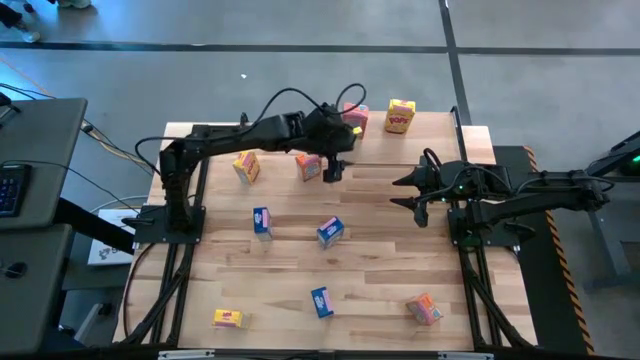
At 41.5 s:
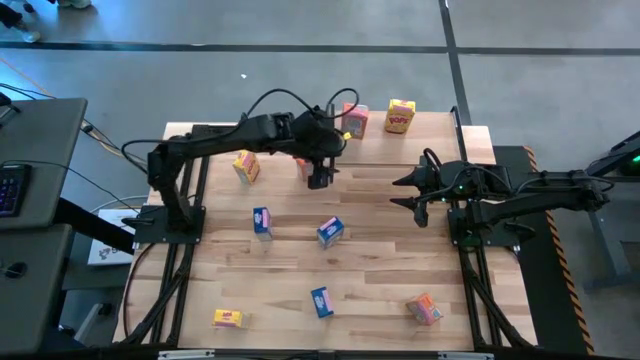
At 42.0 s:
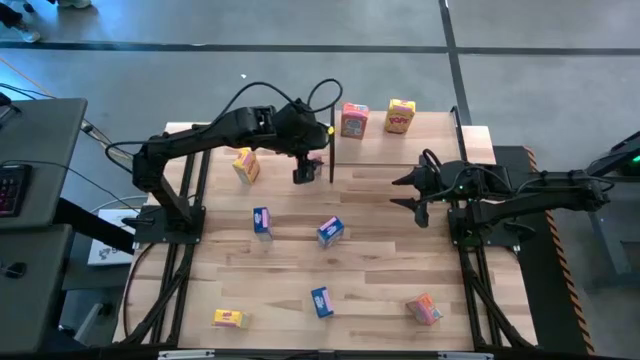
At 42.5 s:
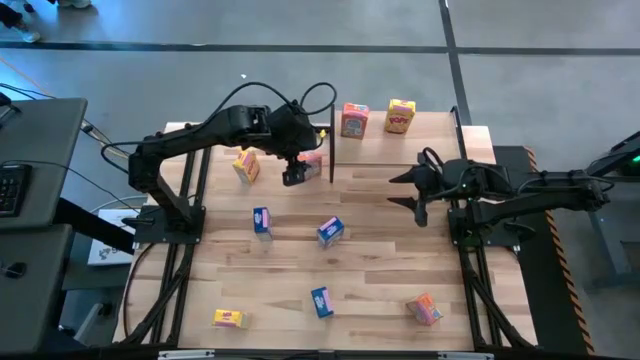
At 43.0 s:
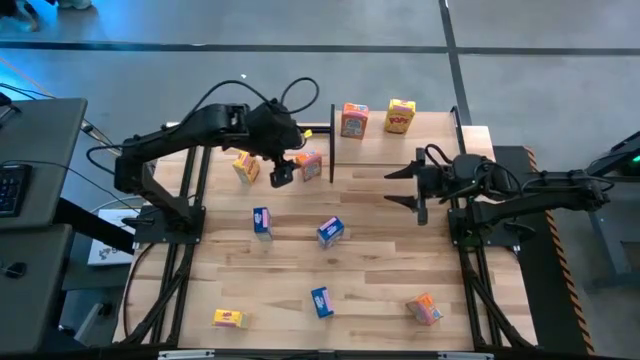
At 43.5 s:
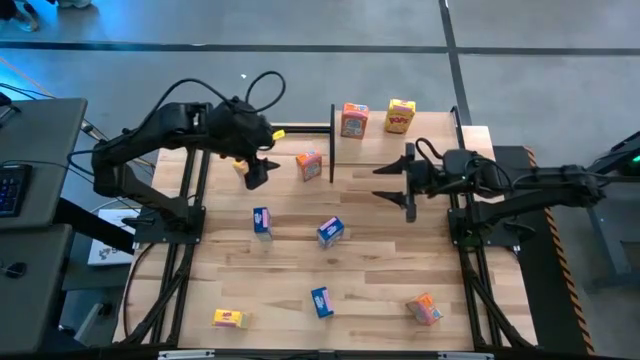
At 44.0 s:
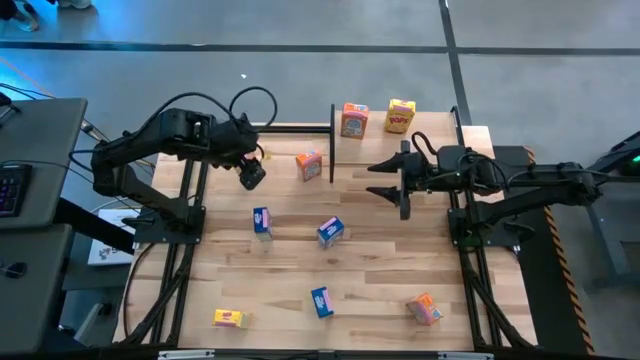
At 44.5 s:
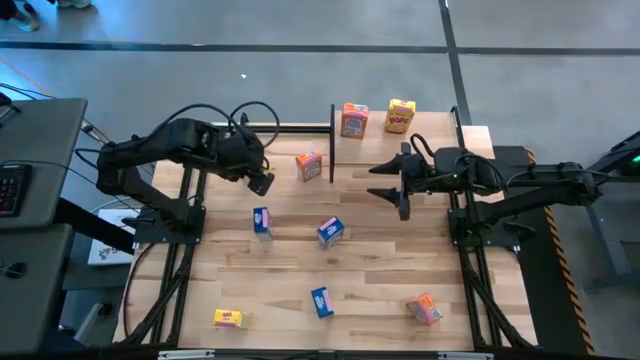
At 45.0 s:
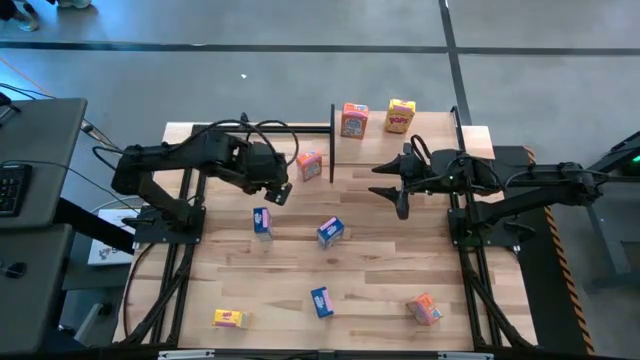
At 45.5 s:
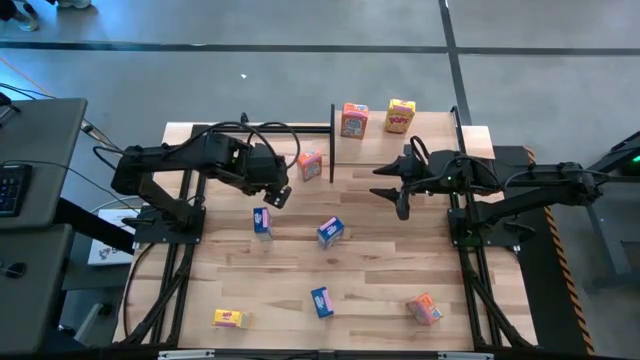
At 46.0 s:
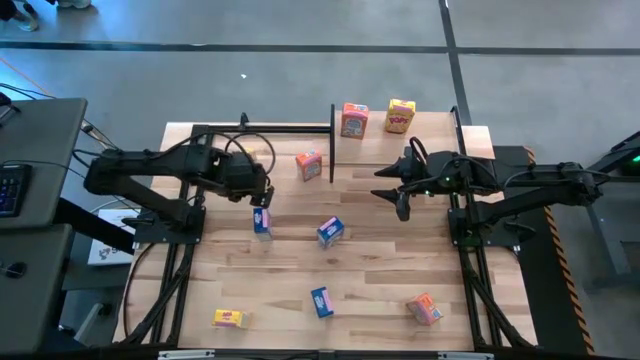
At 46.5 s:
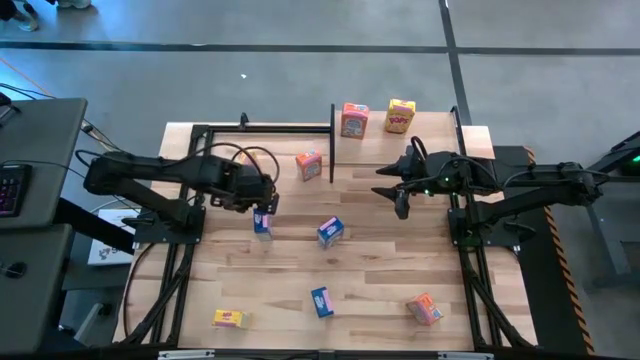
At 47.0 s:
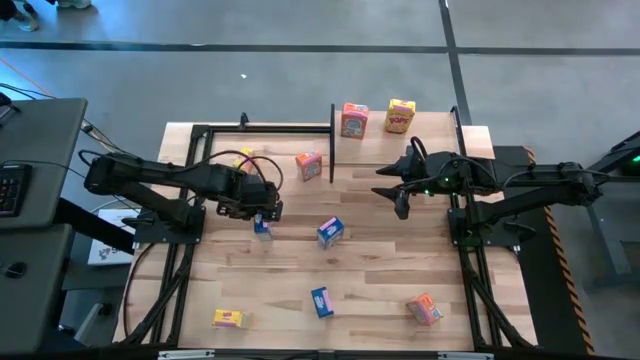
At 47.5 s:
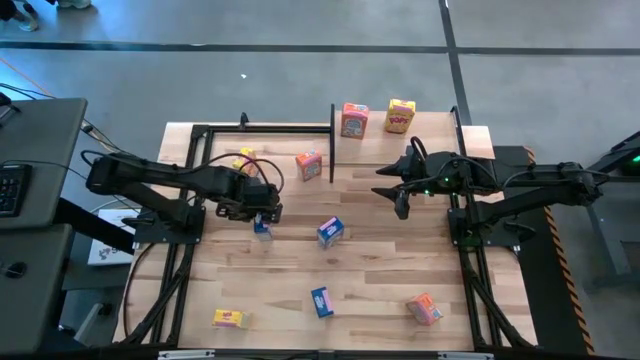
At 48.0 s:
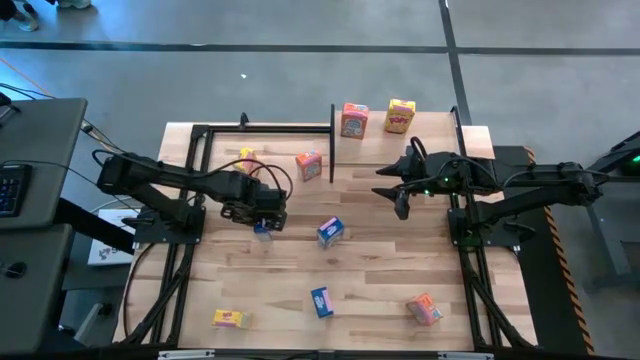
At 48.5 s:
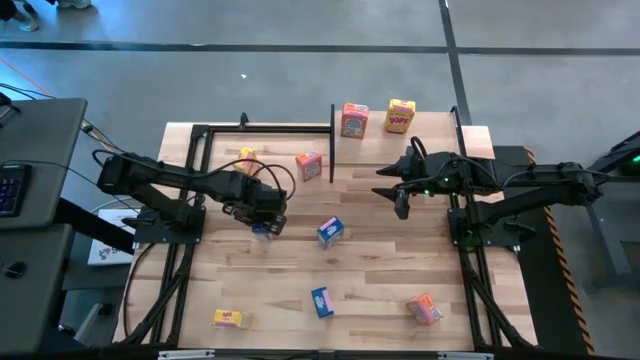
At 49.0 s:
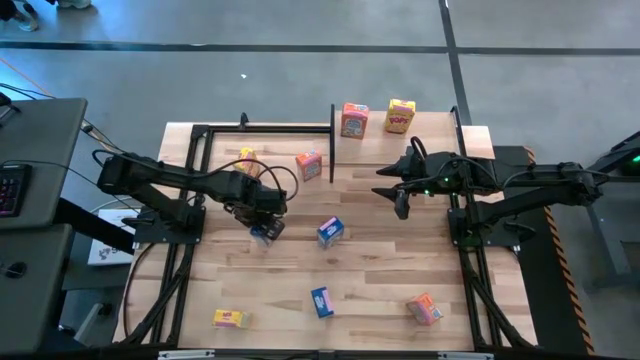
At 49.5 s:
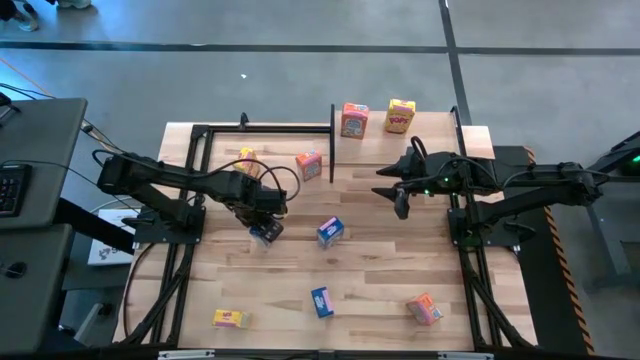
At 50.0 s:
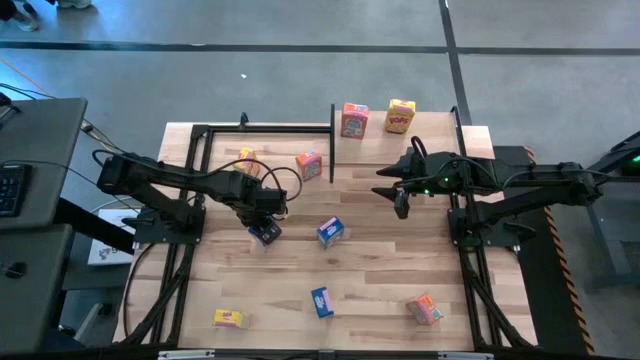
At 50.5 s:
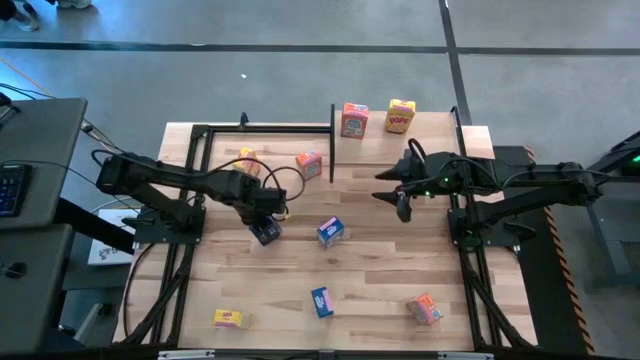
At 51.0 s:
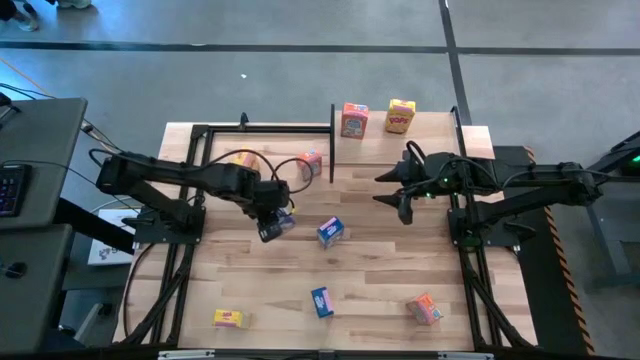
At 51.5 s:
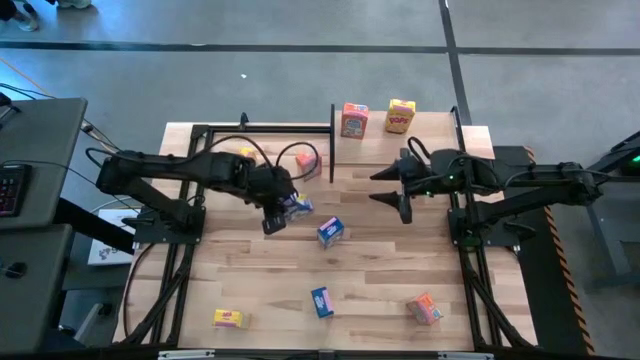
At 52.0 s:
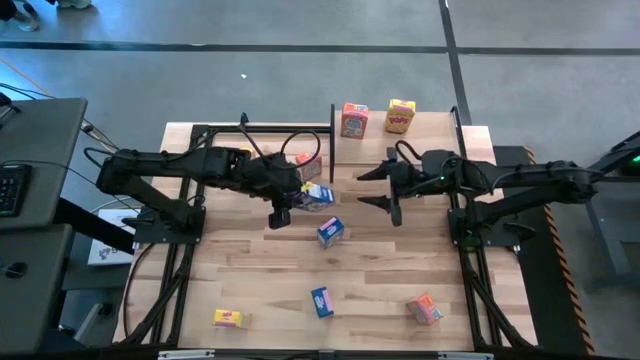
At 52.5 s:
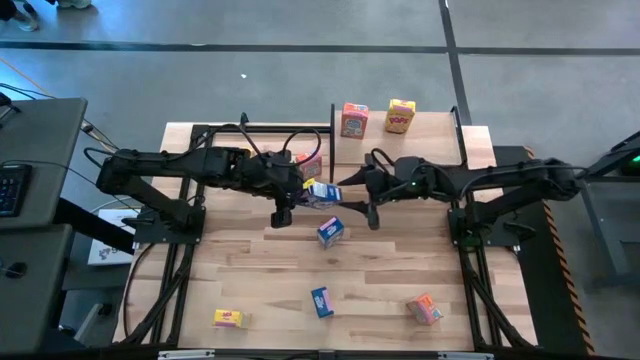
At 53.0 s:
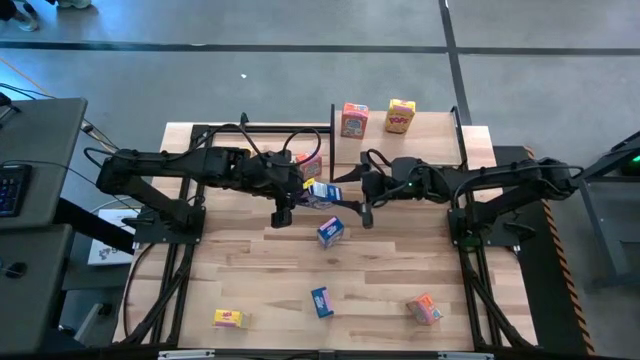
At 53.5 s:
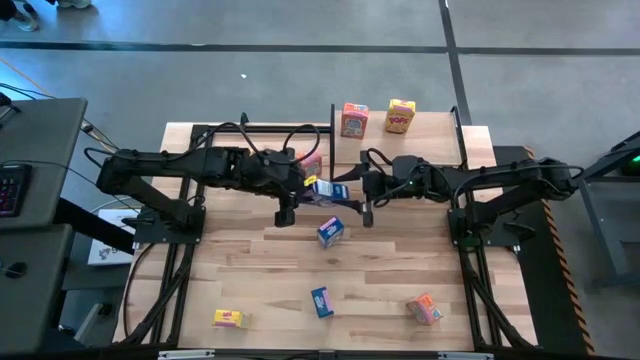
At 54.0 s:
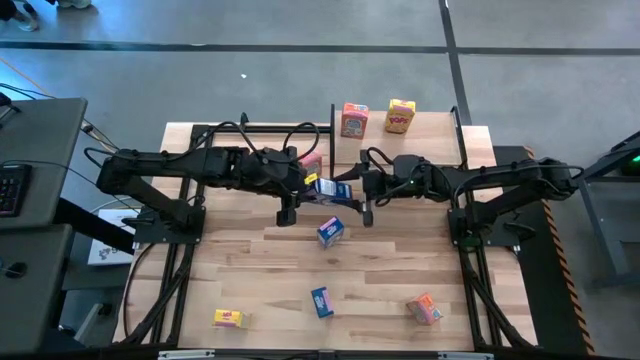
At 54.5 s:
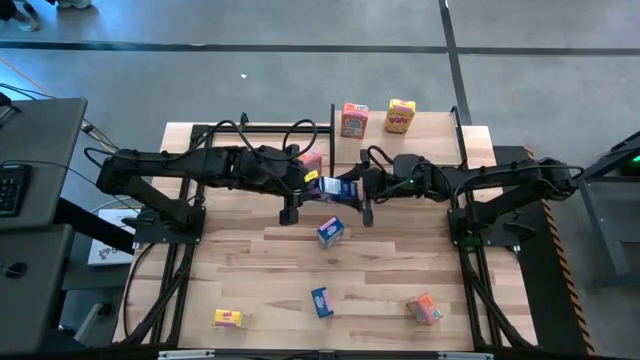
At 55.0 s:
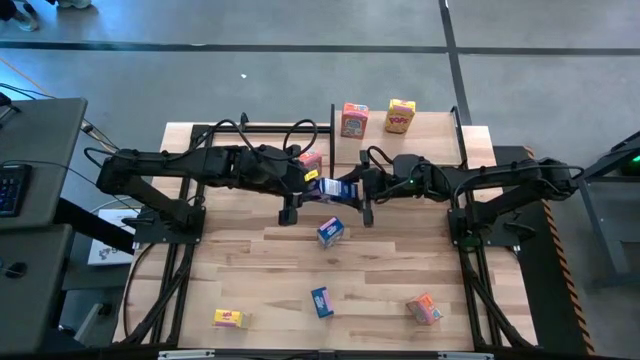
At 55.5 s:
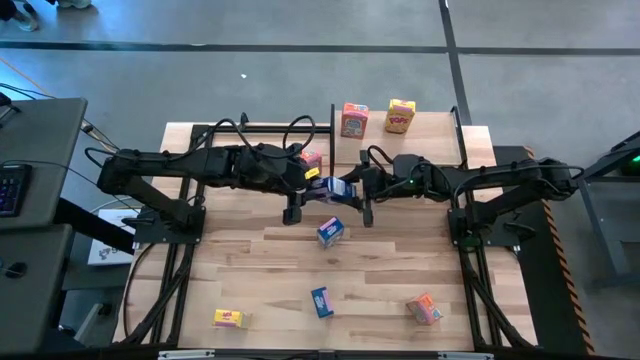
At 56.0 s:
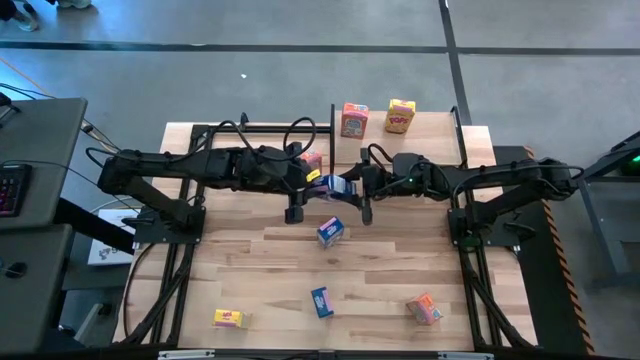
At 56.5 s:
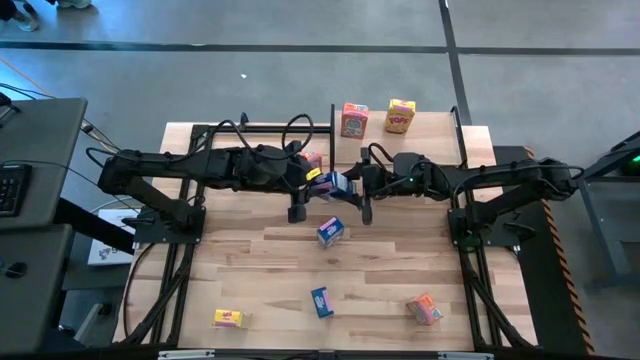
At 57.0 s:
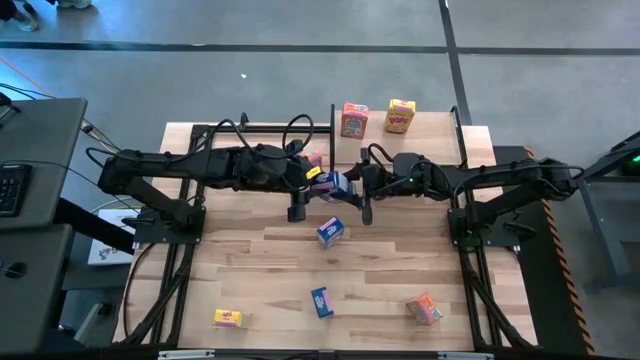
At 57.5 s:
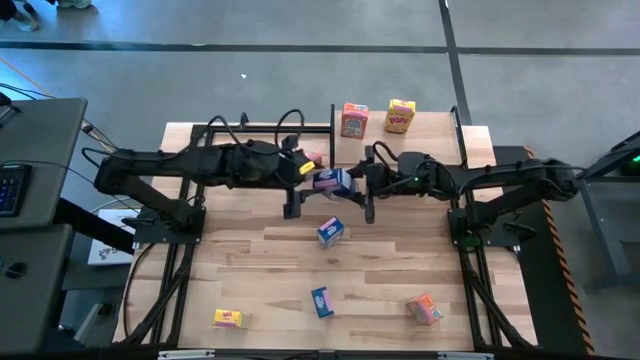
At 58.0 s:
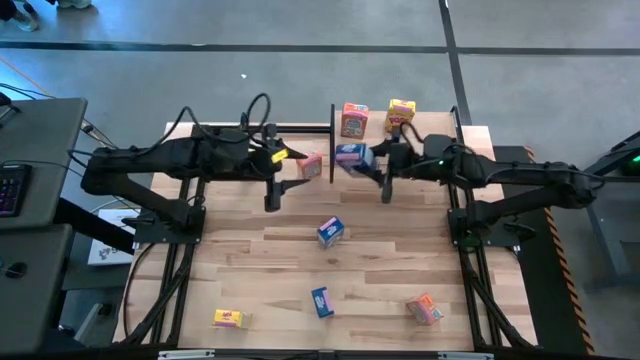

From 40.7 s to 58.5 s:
Task: Stack cereal on shelf
Put the top left blue cereal box on the shelf

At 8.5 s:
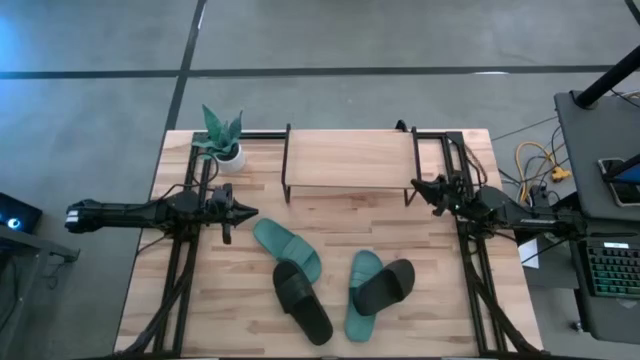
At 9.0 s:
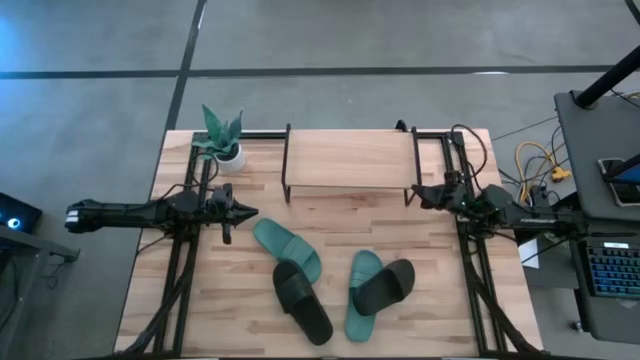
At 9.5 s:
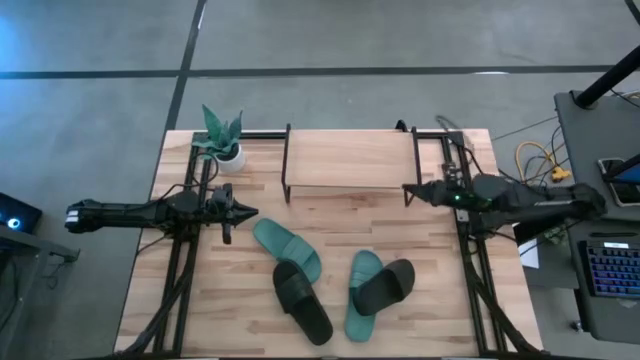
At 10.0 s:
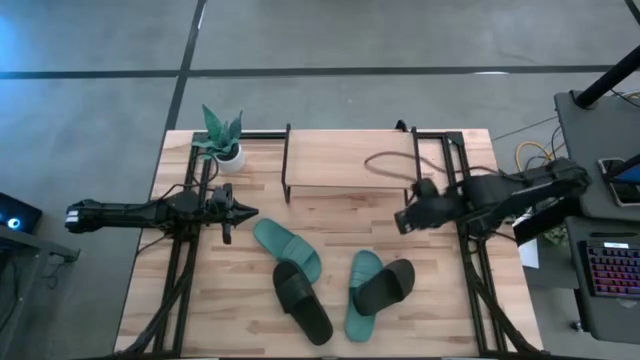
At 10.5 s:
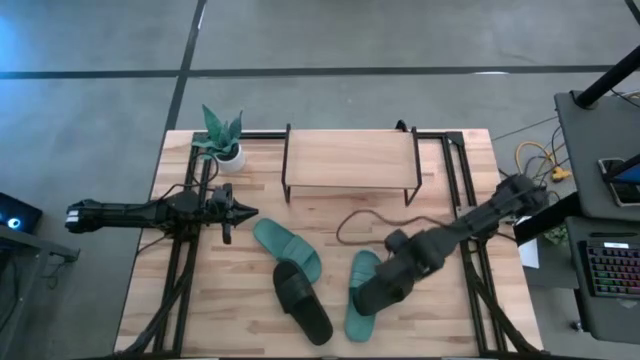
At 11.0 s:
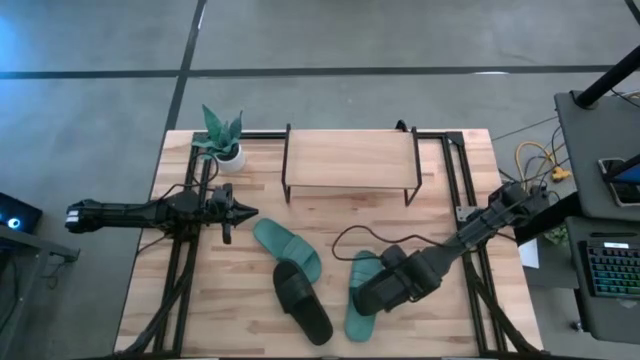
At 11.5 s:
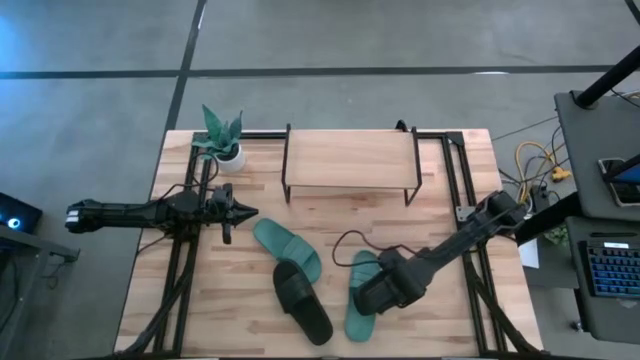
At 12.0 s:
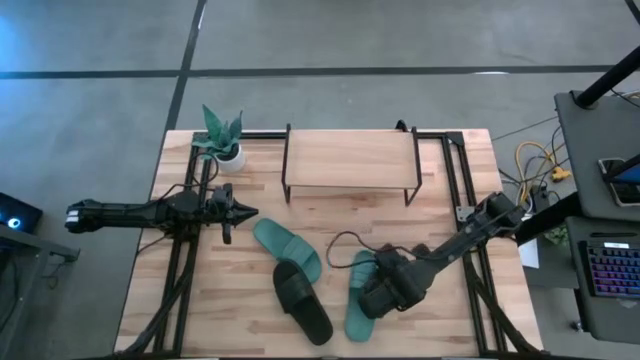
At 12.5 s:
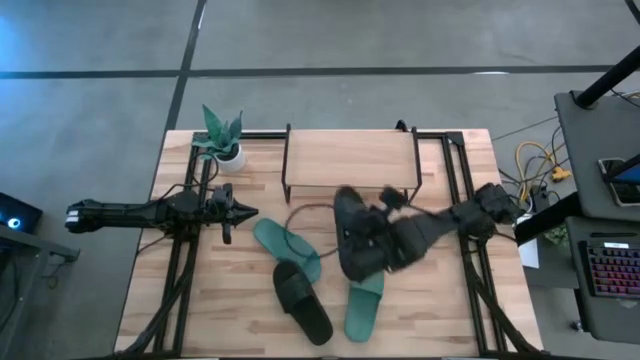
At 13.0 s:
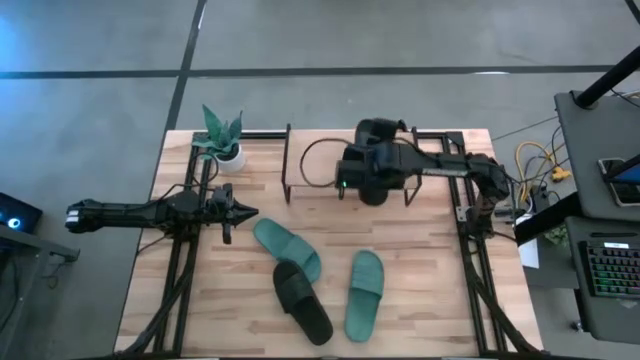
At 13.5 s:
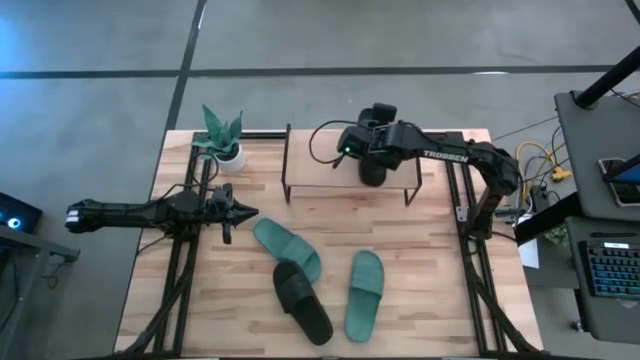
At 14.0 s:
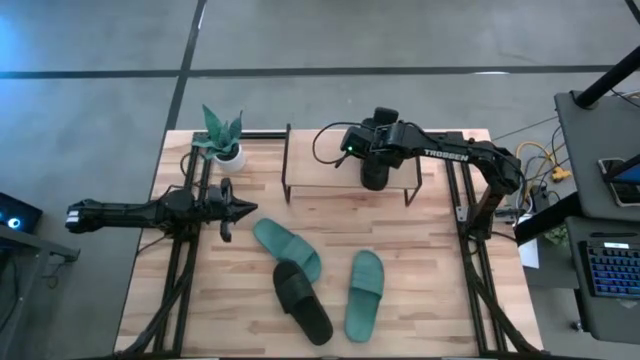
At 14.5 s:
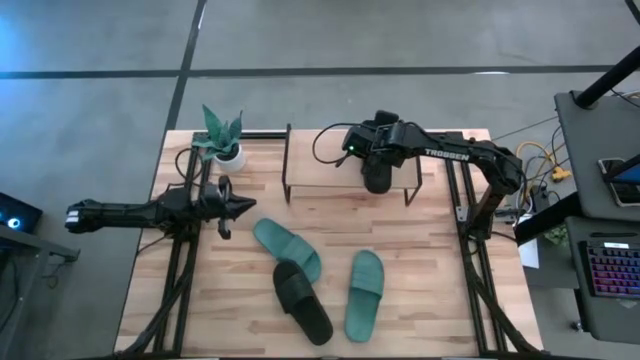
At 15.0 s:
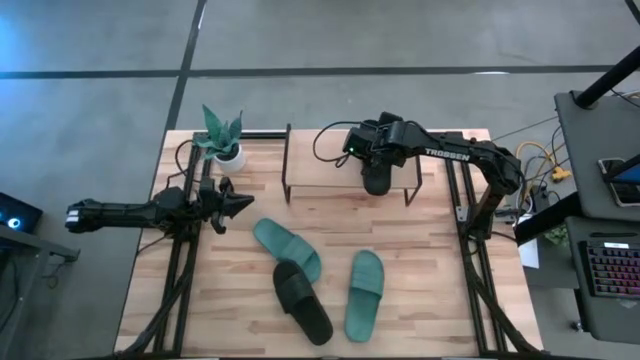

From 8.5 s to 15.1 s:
Task: Pick and place slides into the shelf
Put the right black slide on the shelf
